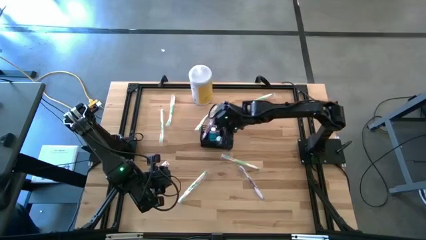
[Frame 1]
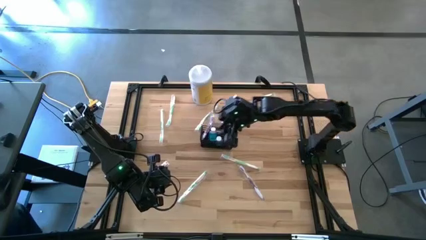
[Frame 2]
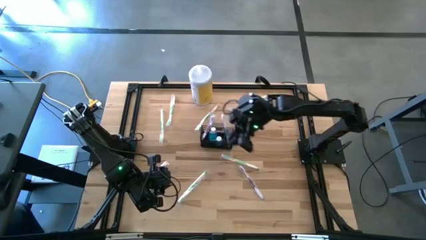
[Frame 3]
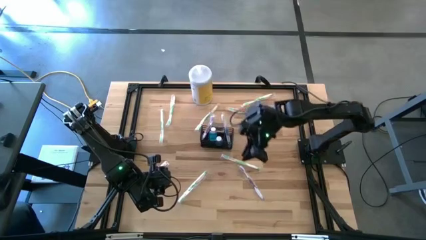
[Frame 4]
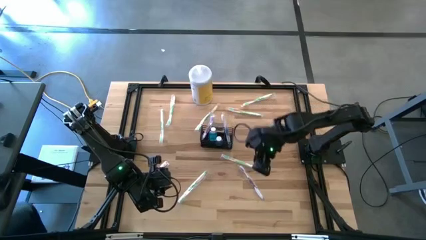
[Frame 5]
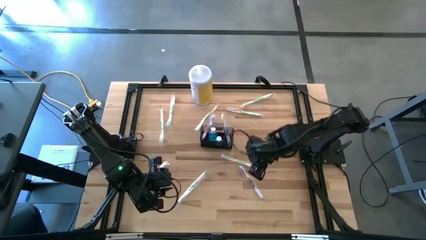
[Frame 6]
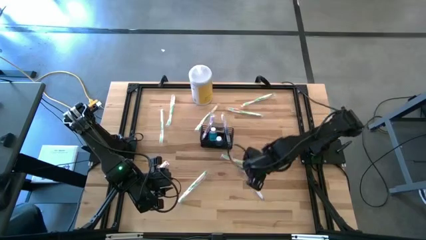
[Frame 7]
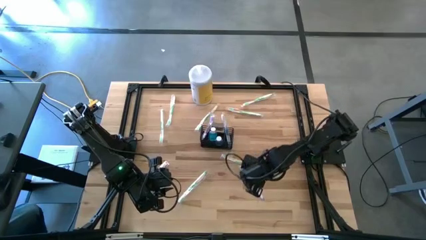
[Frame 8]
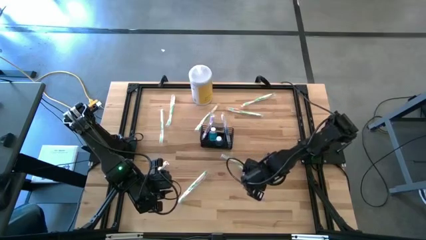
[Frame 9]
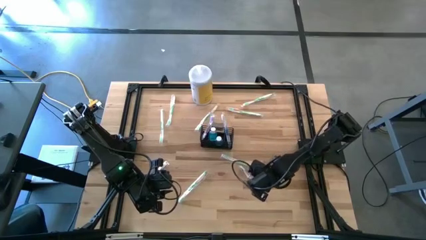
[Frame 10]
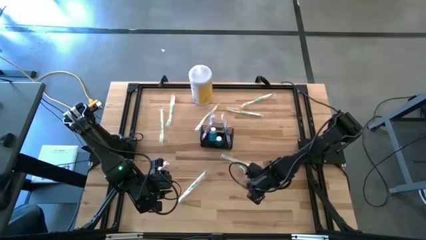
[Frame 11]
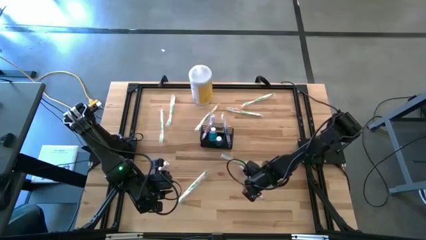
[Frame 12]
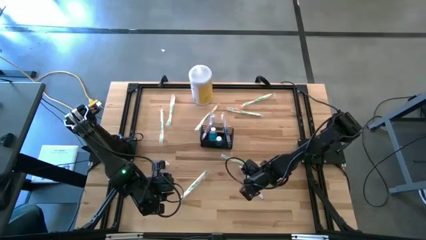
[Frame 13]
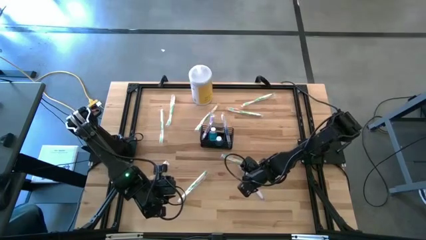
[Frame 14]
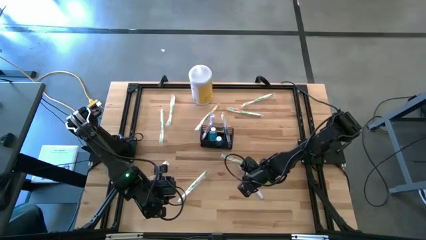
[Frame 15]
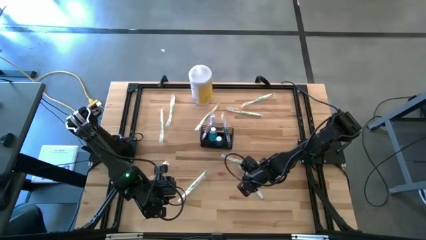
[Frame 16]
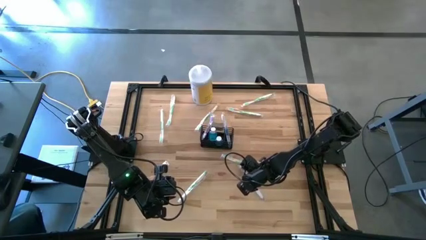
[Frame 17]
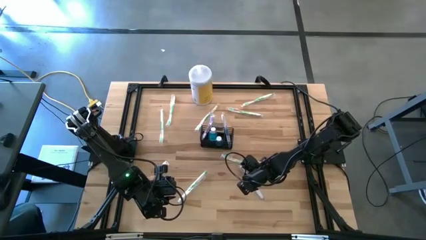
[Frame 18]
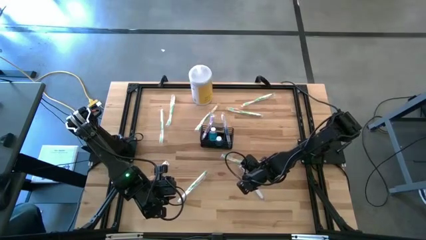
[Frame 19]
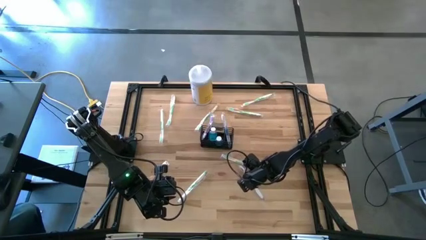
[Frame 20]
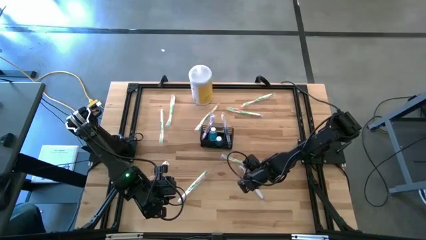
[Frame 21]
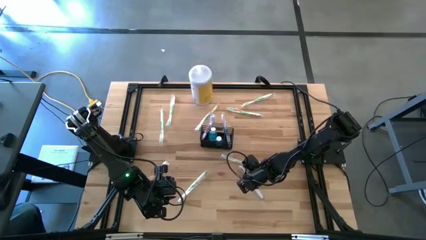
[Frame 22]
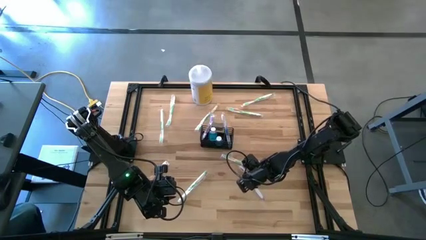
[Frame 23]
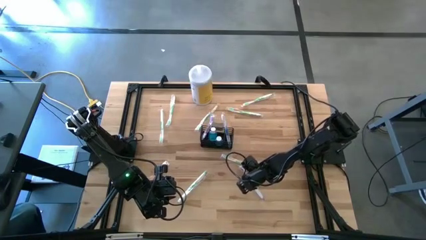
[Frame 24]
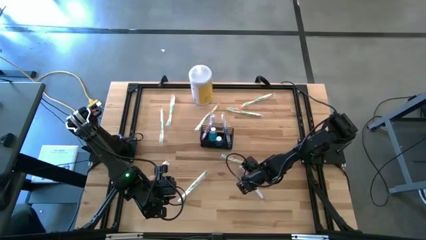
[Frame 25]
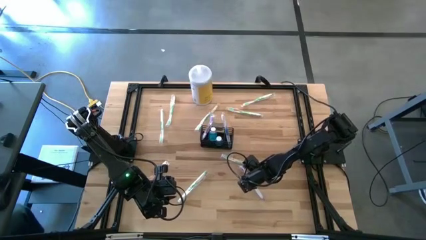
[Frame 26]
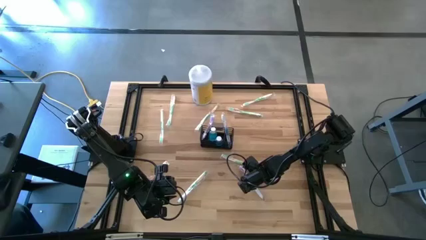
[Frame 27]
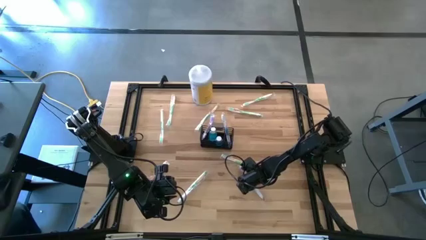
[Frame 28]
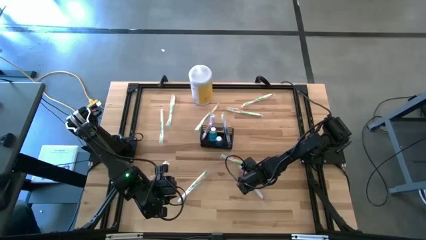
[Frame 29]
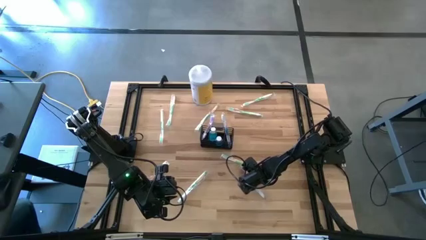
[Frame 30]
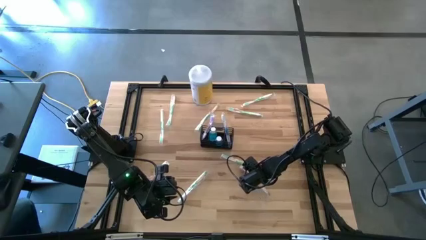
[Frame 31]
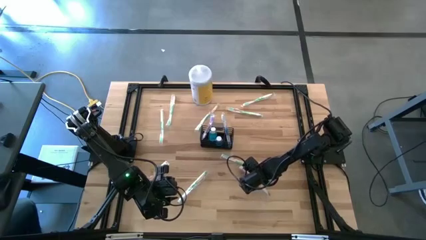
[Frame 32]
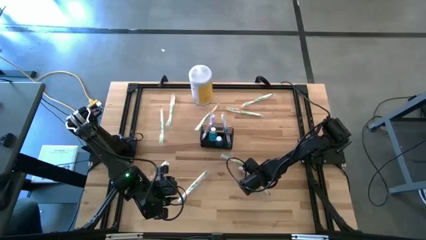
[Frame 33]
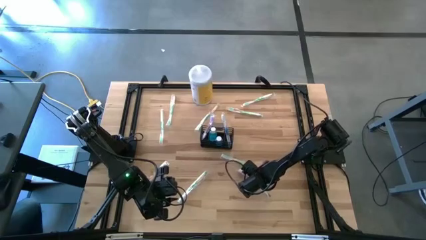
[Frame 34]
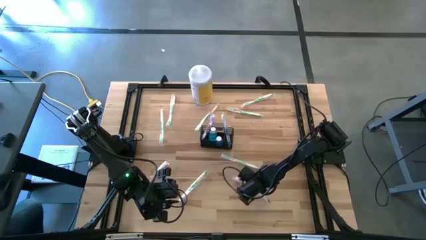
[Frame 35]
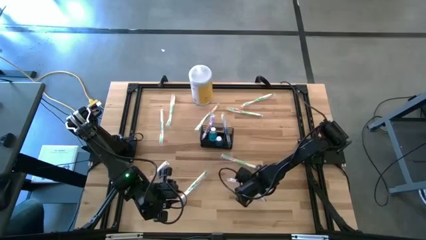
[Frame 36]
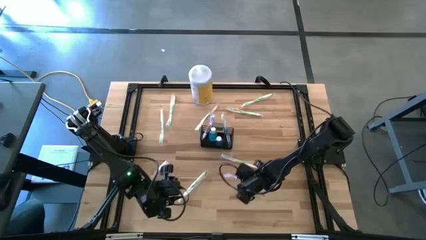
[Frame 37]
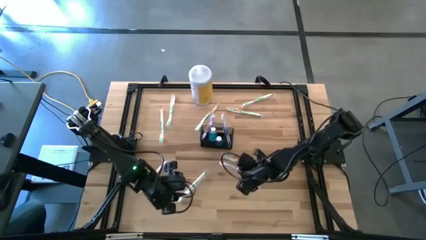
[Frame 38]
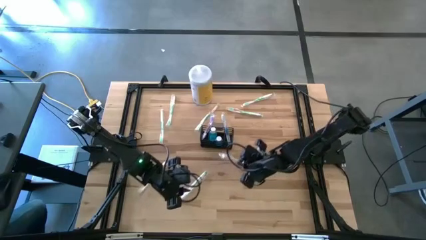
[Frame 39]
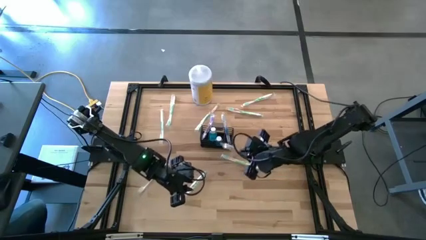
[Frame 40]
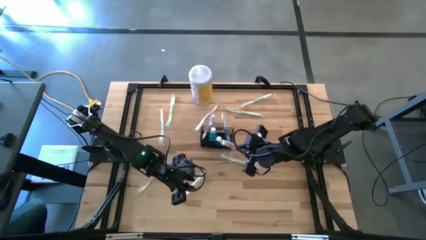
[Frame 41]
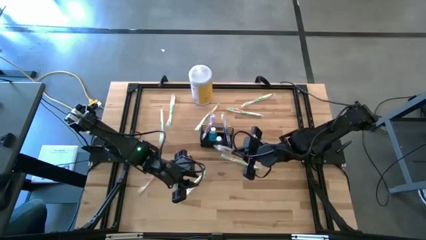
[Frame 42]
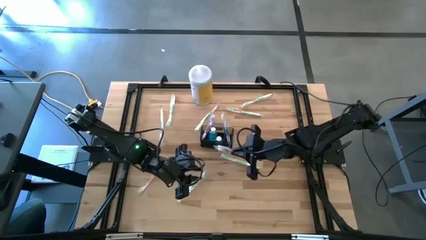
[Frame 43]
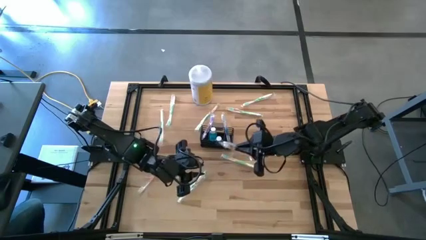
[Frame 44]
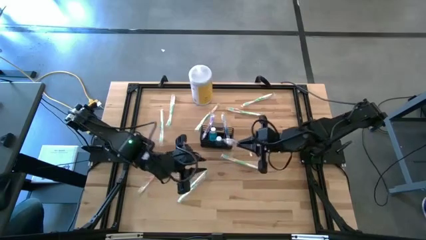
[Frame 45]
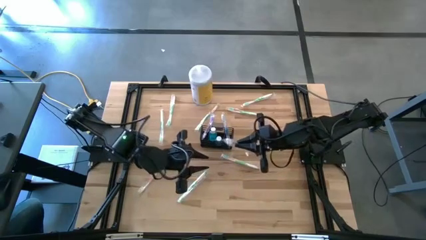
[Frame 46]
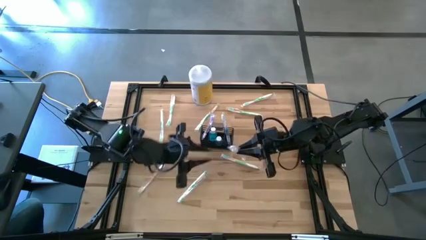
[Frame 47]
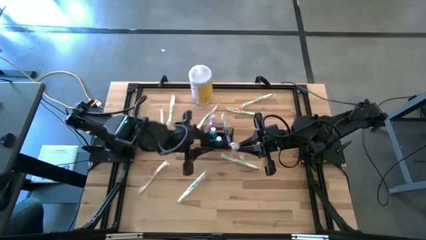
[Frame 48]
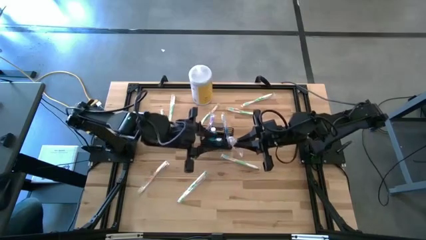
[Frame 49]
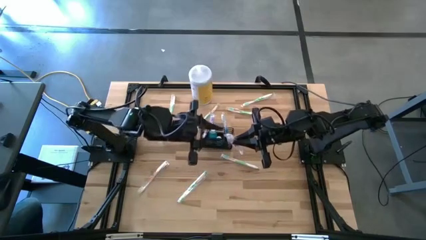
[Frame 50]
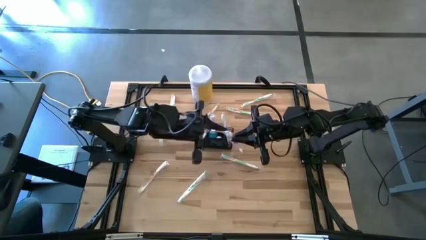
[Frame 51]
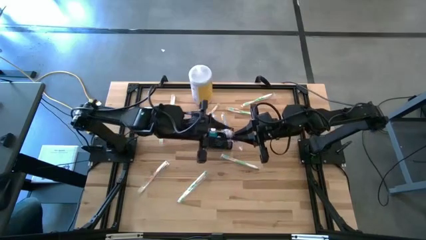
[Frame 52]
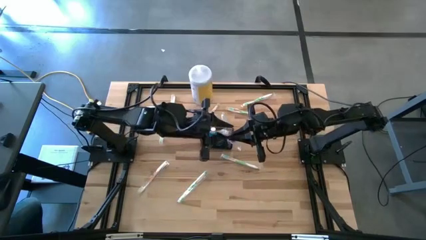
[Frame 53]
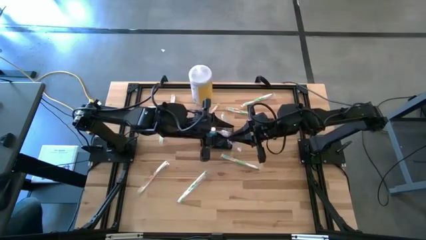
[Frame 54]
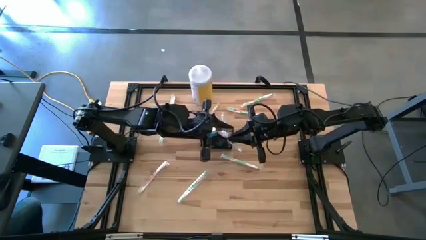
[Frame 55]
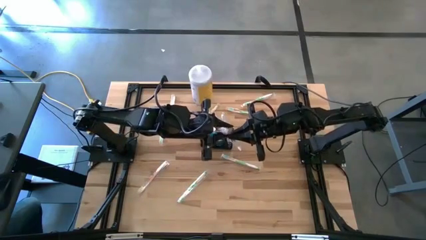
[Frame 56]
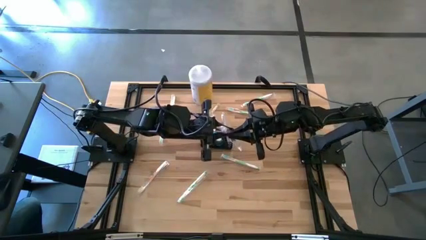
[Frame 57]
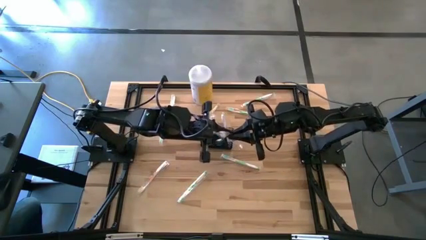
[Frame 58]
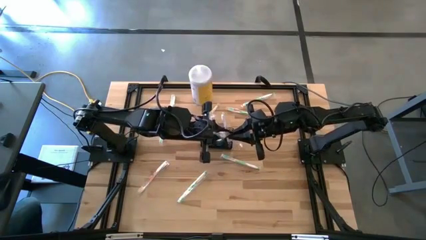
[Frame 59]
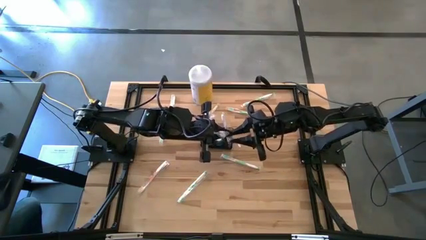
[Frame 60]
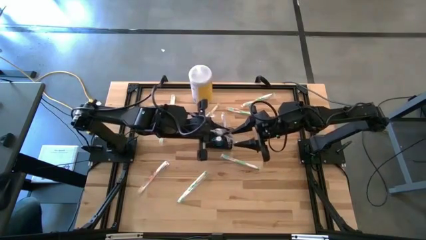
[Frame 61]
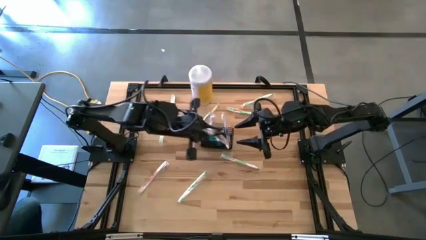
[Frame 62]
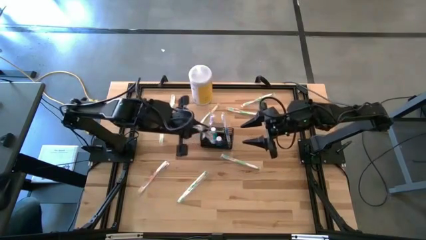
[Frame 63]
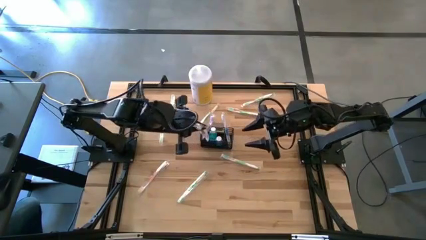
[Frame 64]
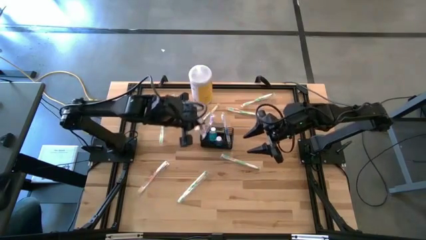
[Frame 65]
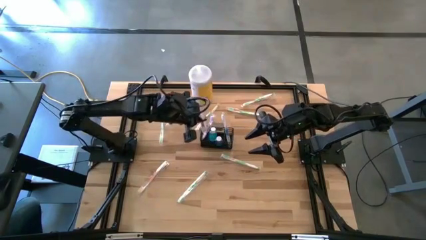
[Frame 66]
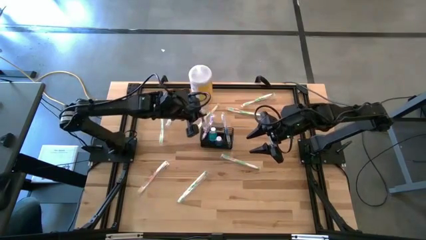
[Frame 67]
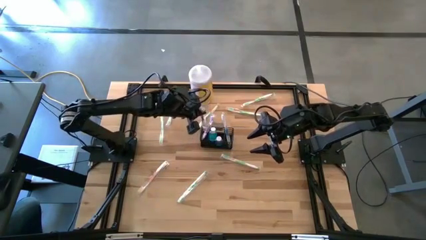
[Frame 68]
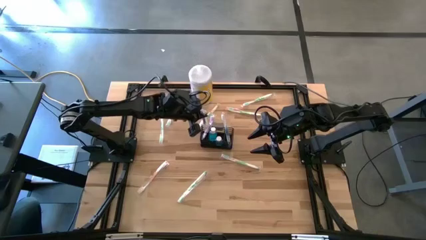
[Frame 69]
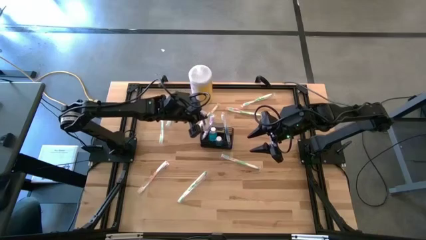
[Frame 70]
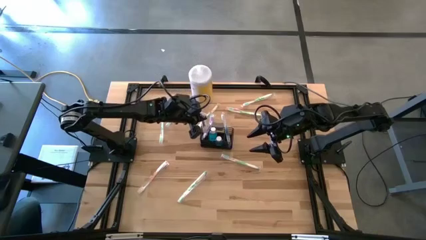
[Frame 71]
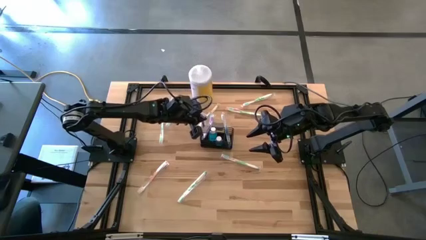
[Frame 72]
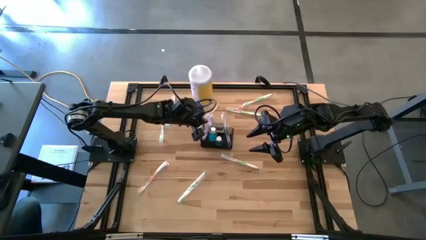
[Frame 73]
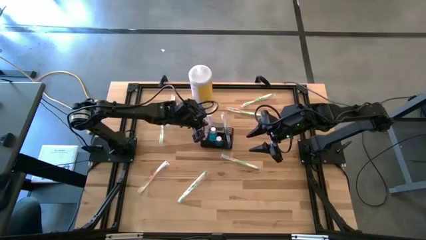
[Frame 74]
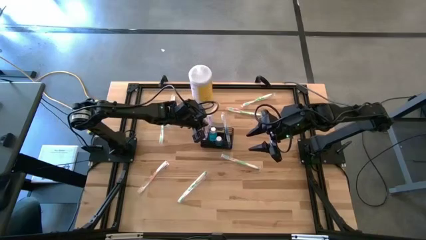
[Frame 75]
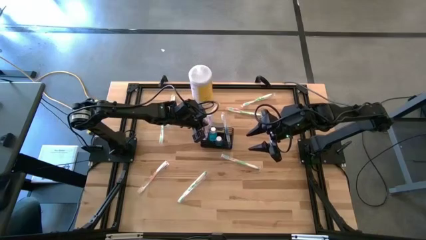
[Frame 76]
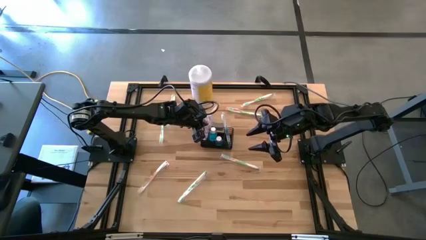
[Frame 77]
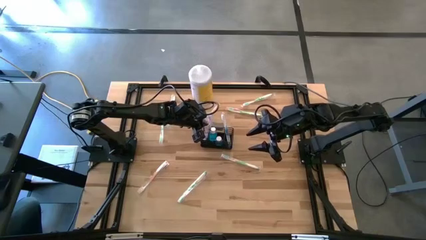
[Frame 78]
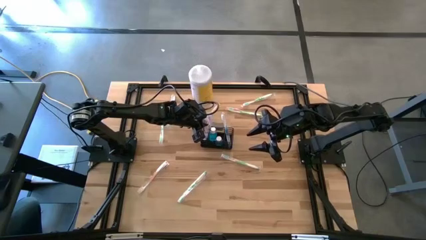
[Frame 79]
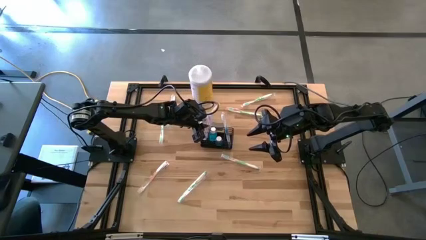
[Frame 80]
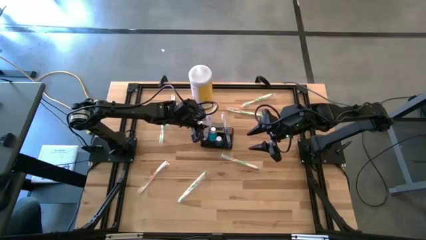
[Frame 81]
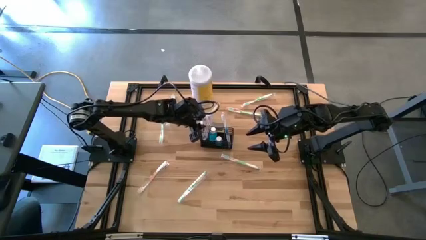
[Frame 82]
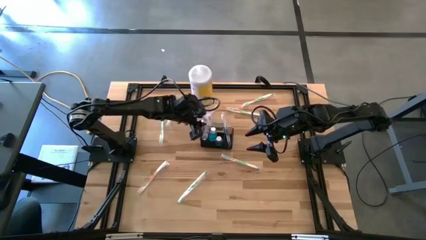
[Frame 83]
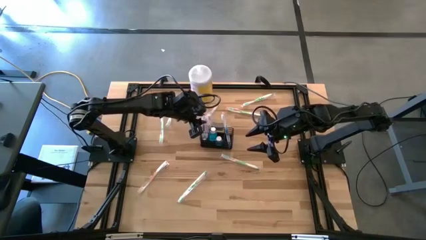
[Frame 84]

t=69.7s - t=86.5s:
Task: Pick & Place toothbrushing station
Put the purple toothbrush into the left section wire organizer
